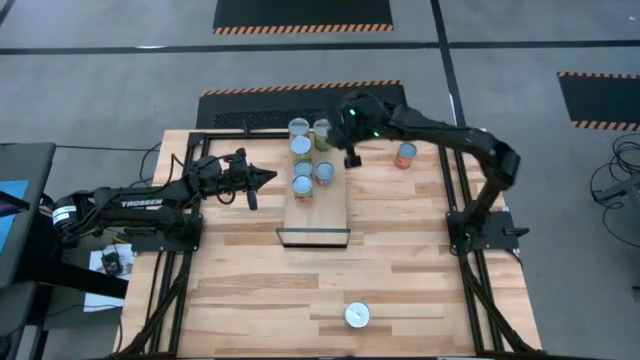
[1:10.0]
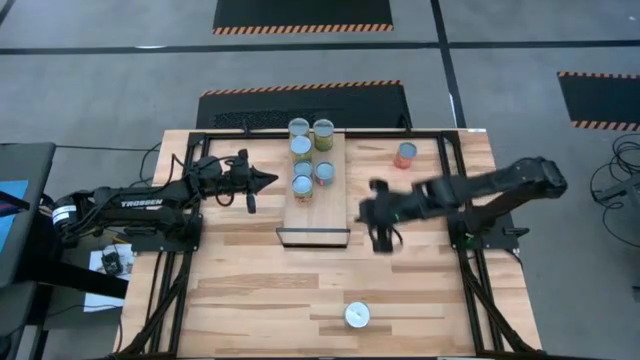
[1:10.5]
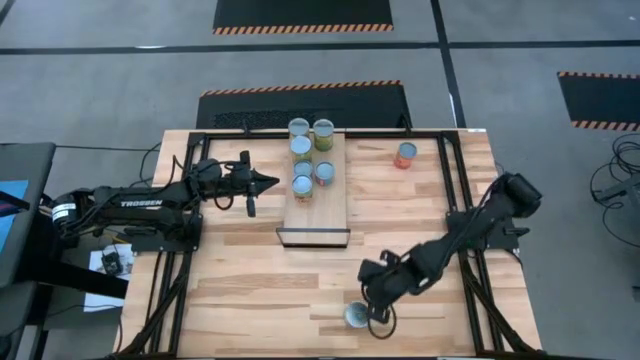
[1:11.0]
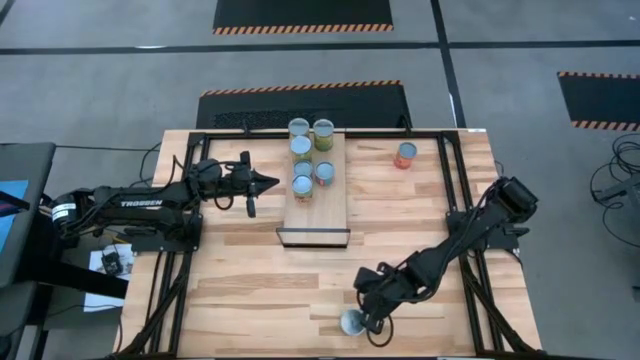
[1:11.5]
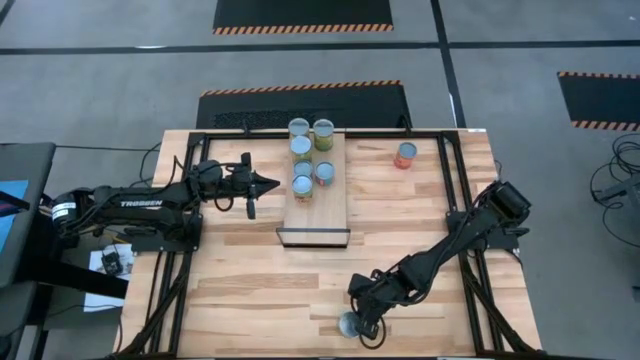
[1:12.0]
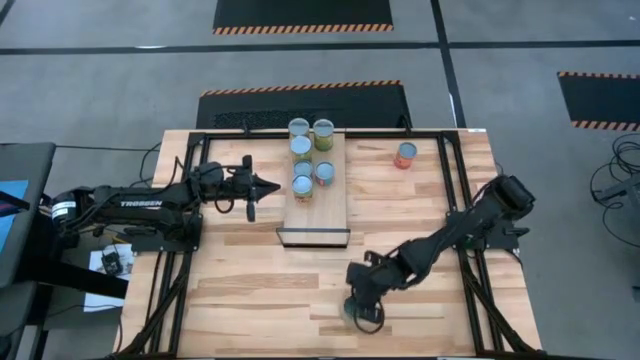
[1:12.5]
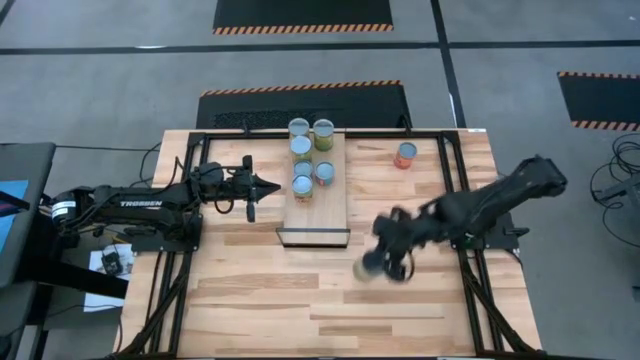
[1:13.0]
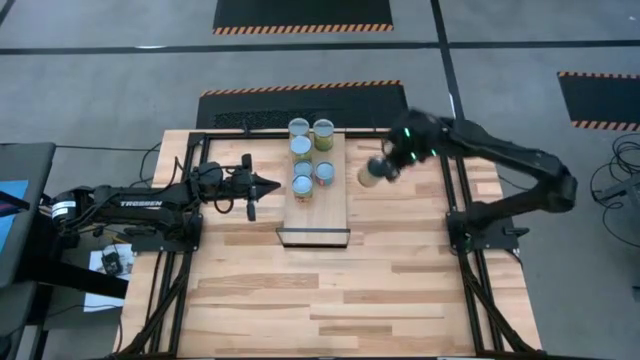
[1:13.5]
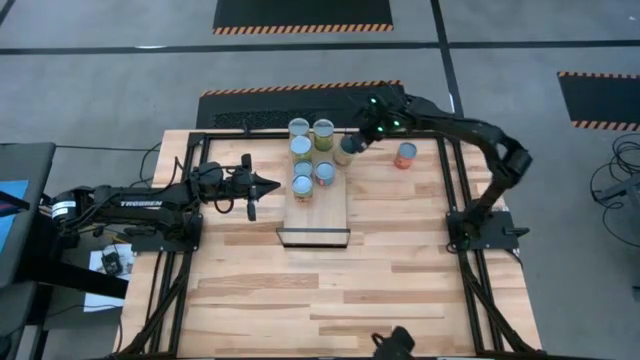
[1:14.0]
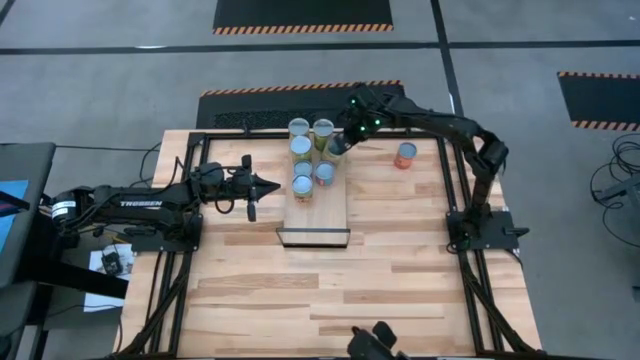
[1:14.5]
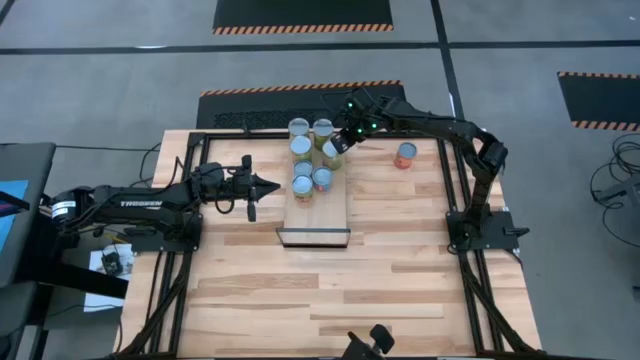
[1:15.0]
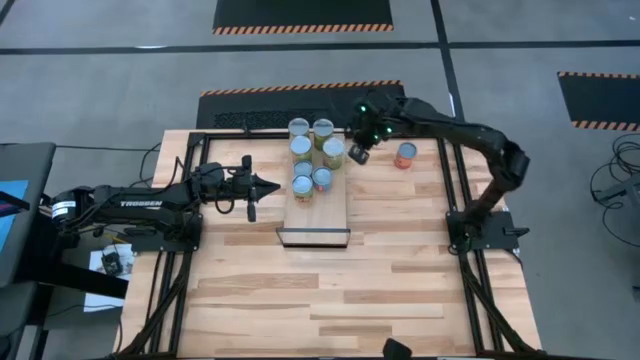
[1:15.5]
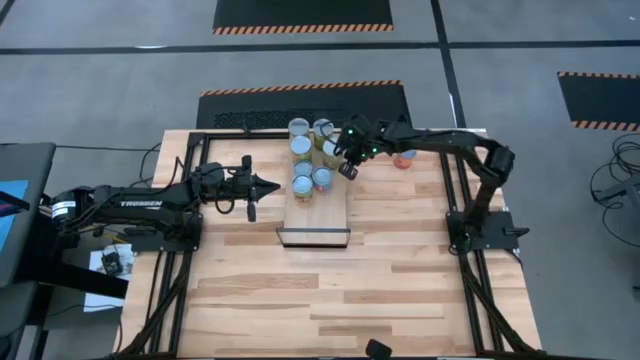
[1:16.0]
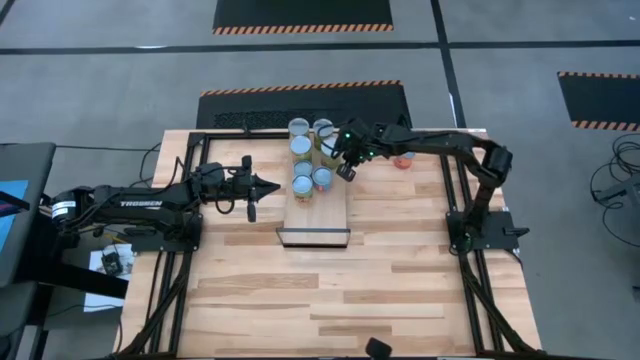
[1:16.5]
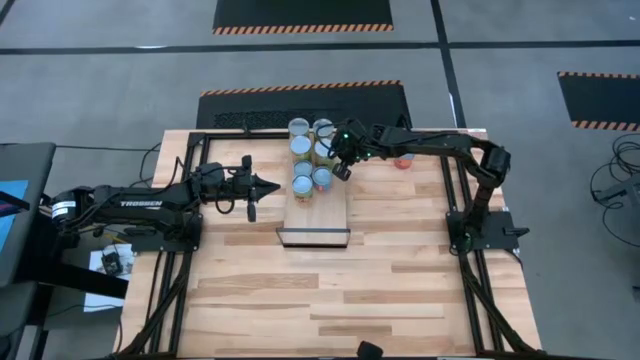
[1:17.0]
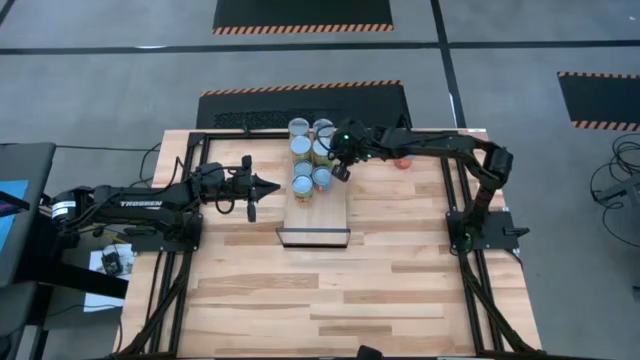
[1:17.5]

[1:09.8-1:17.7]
Task: Pick and place cans onto a shelf
Put the canned oranges on the shelf aligned with the other canned oranges

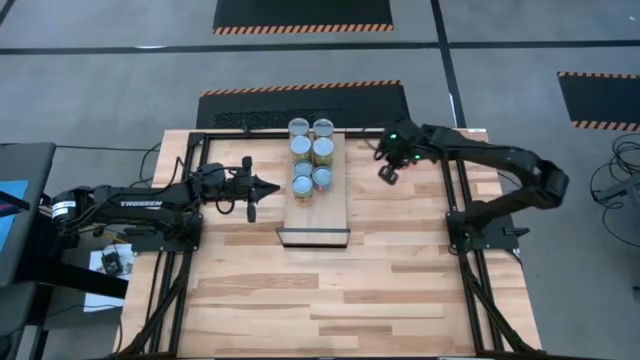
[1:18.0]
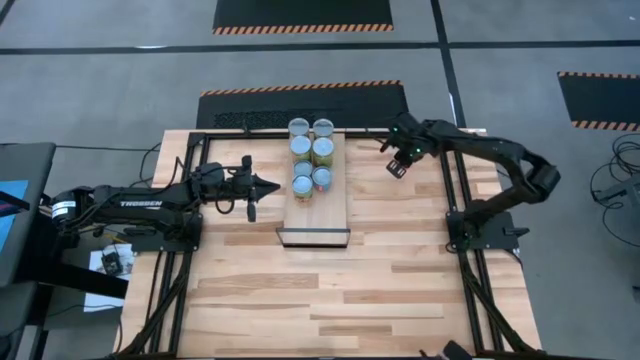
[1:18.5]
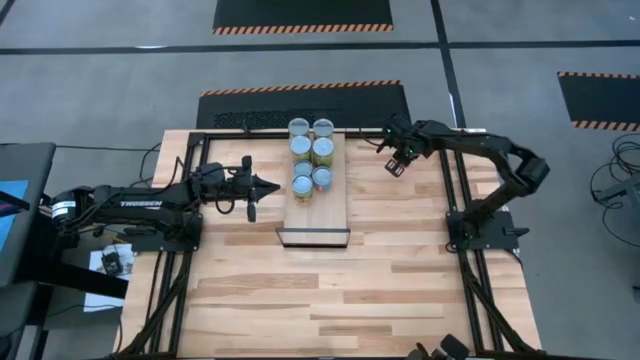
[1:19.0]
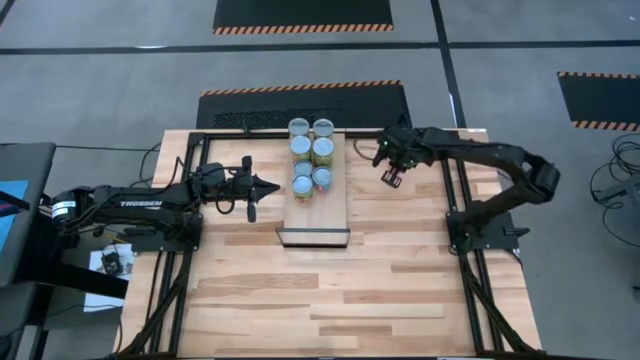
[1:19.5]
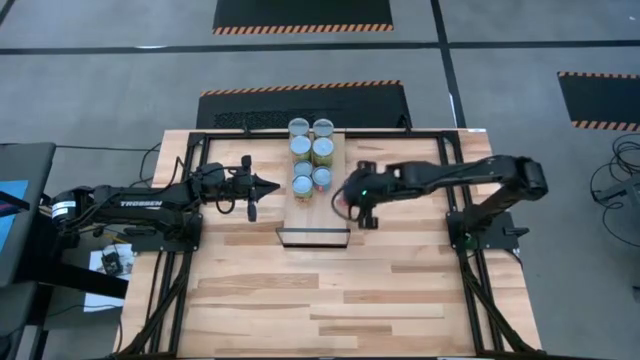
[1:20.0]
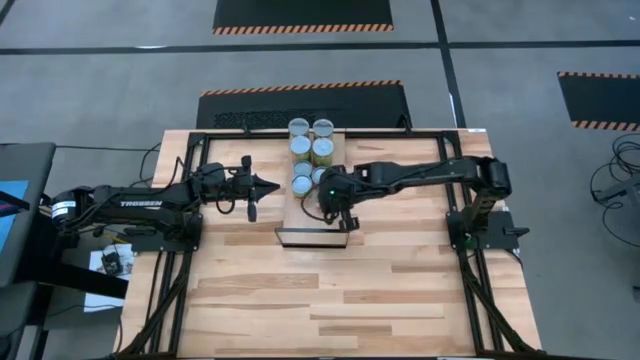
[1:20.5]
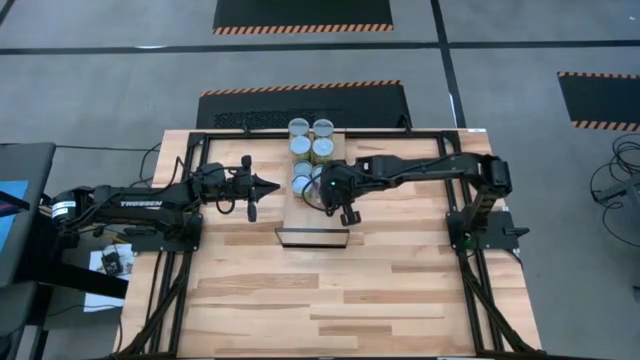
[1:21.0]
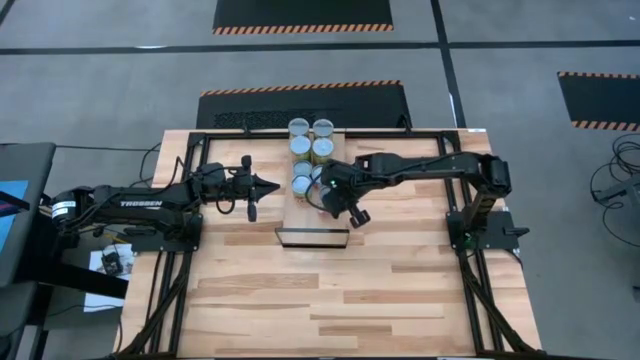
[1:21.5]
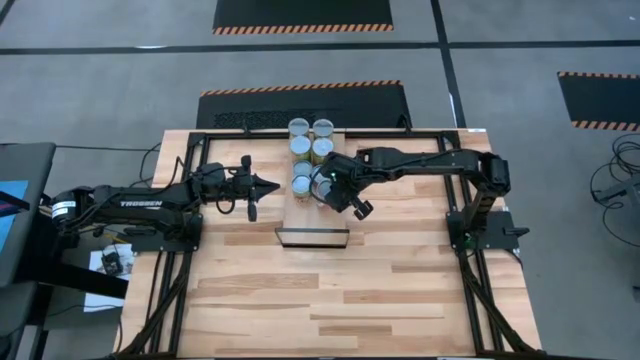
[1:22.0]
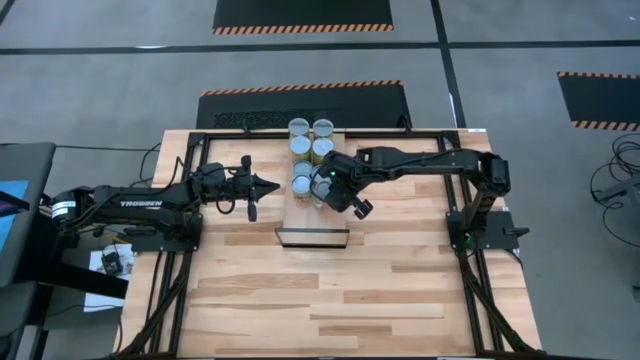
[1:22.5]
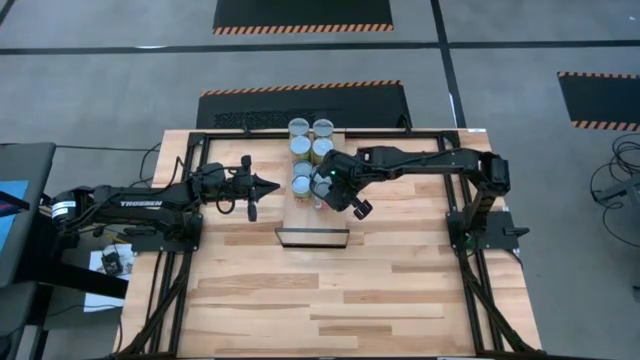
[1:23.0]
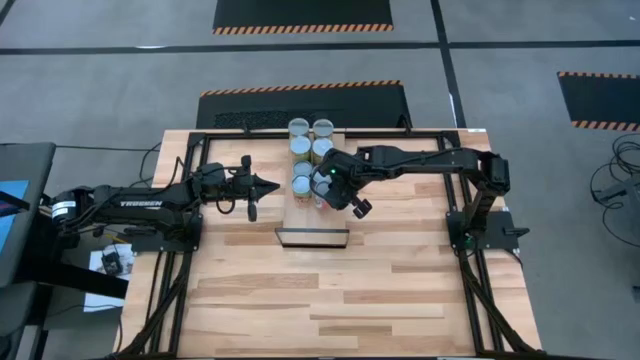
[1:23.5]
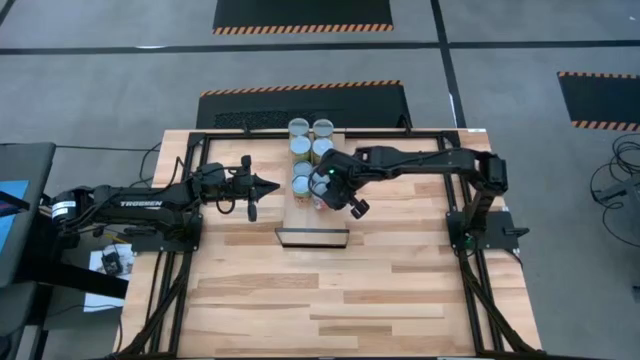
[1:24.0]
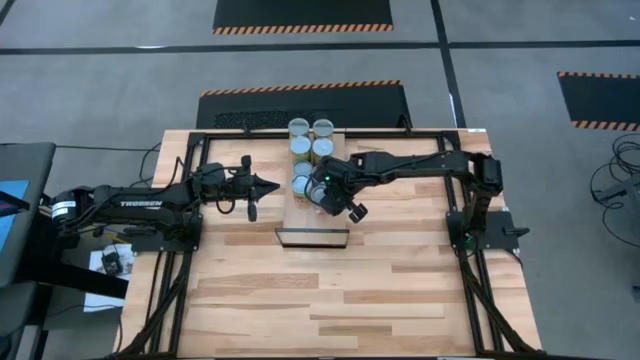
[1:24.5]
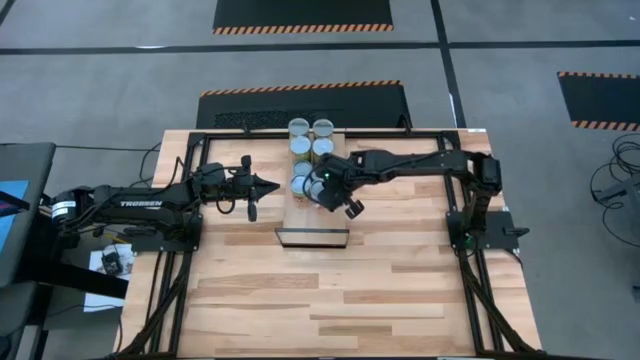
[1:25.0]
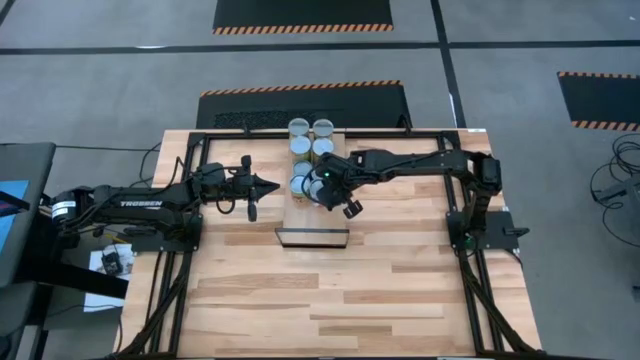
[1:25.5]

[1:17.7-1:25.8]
Put the canned mixed fruit on the shelf

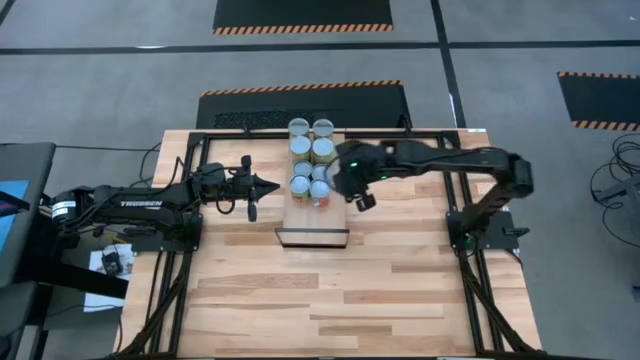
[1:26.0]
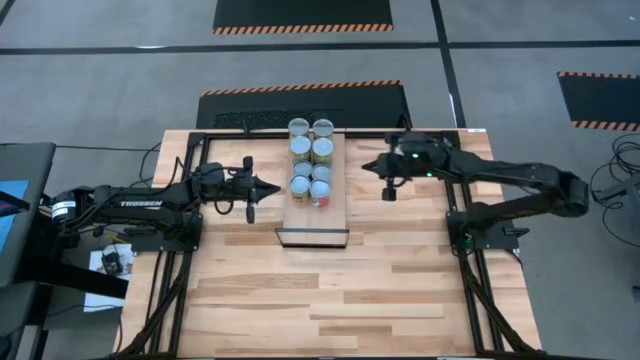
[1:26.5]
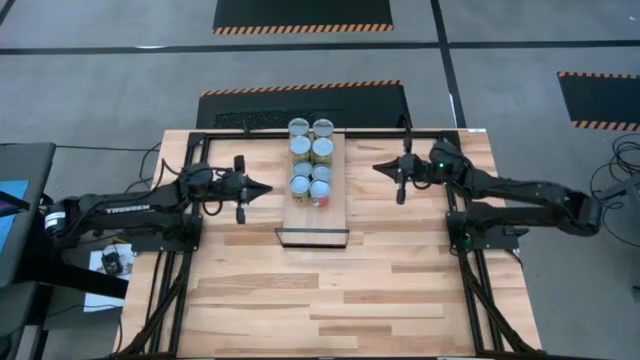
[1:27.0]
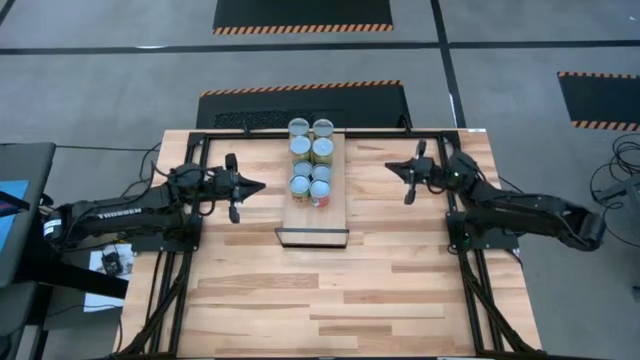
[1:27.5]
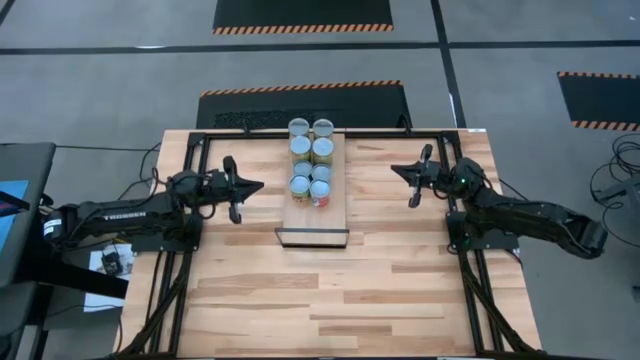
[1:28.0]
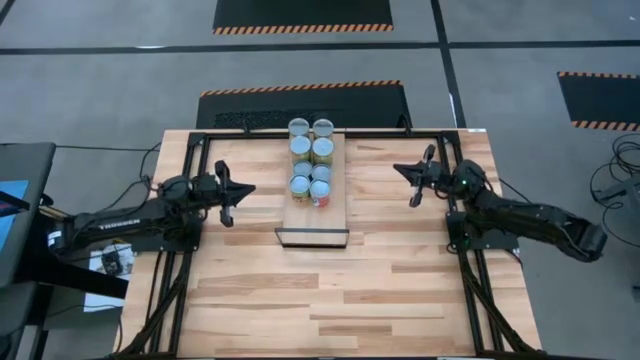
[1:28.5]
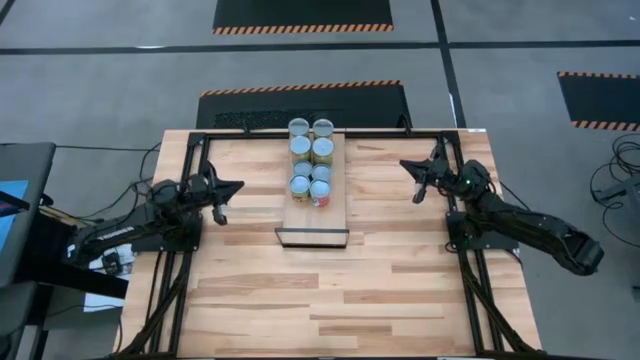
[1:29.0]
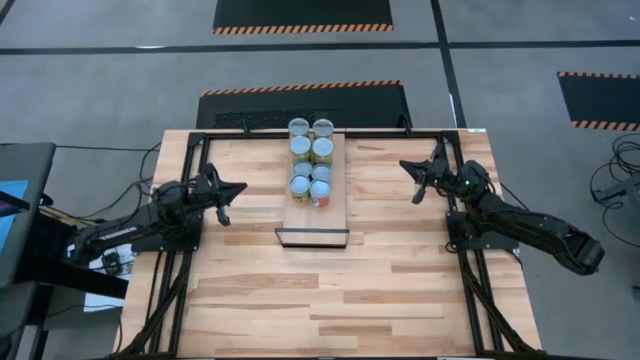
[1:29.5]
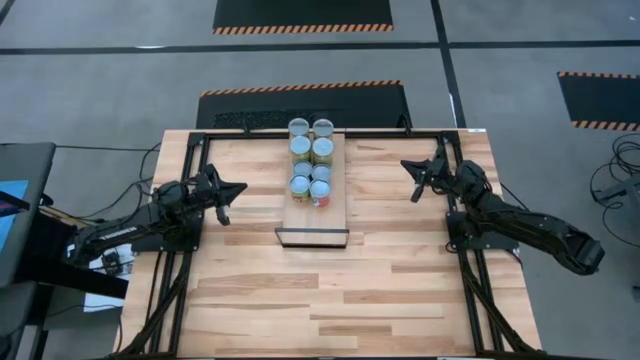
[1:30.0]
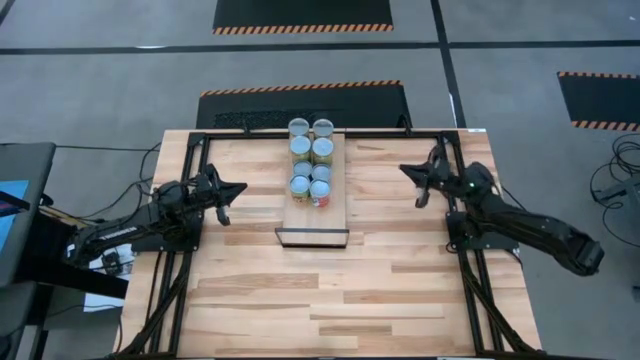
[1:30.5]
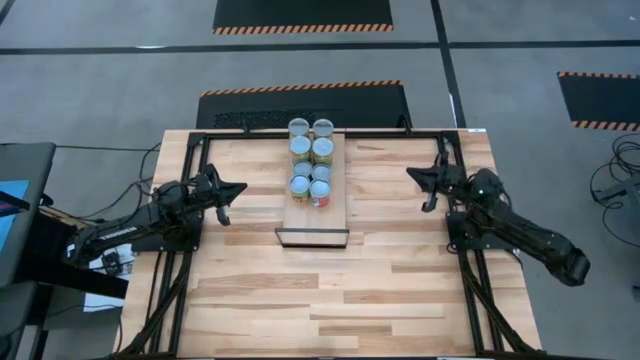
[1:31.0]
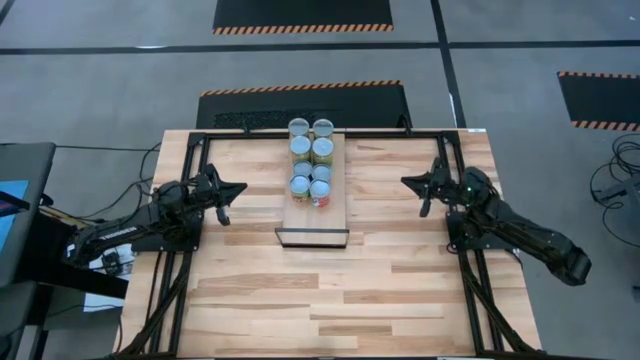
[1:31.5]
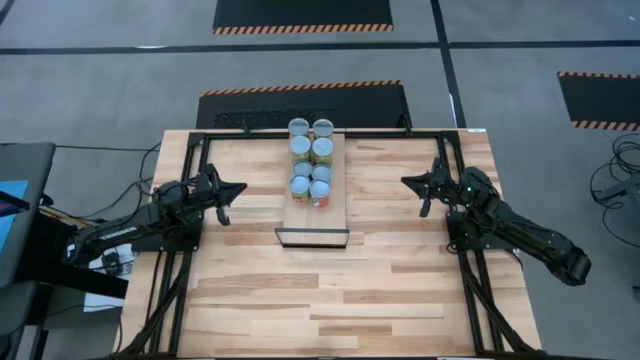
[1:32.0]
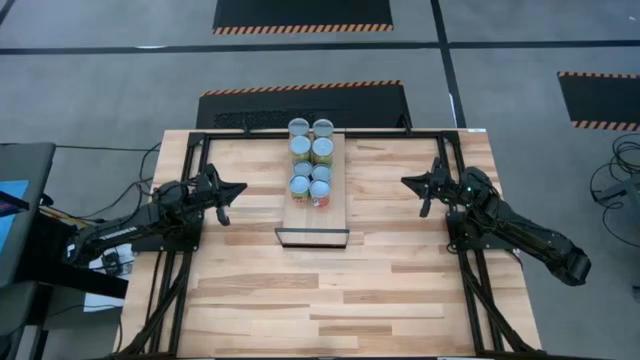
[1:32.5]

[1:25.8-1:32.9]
Return to Home Position
